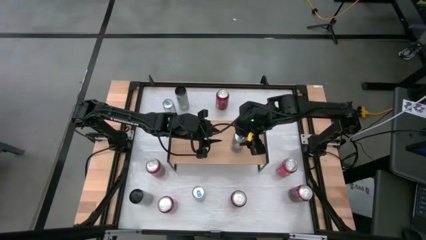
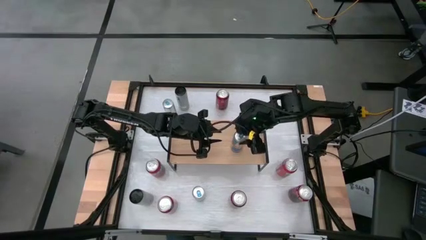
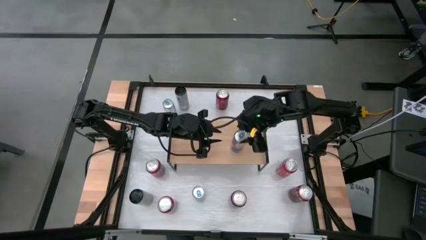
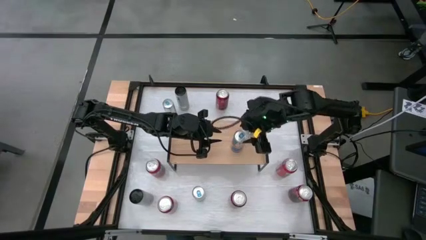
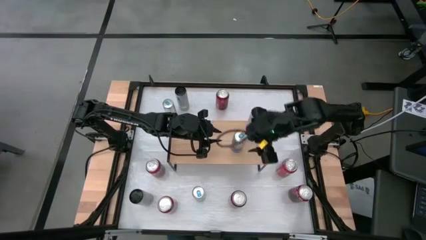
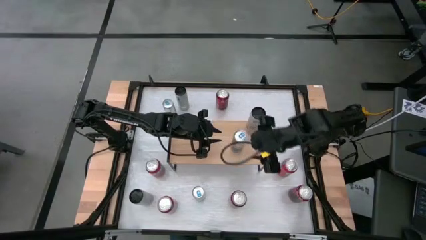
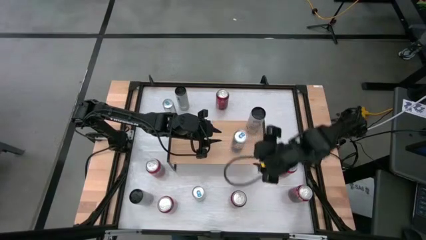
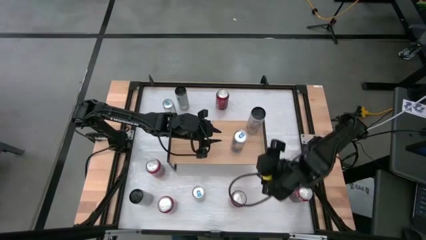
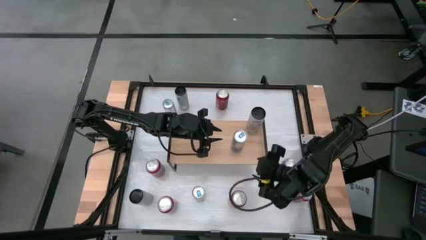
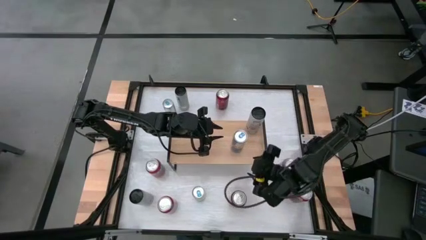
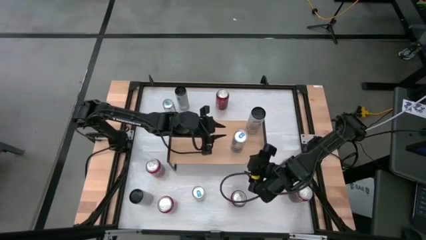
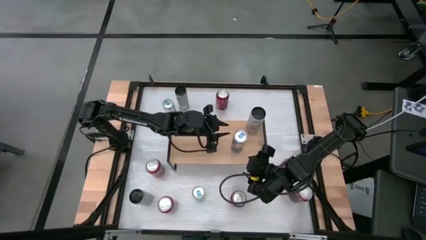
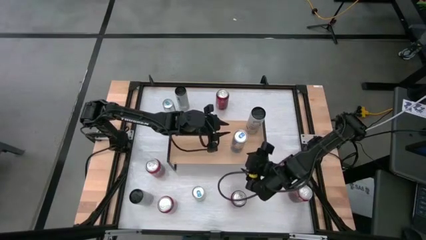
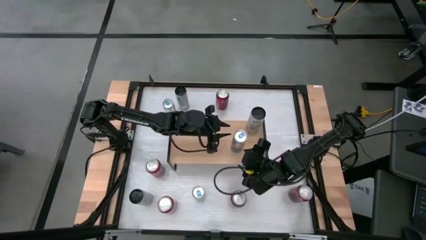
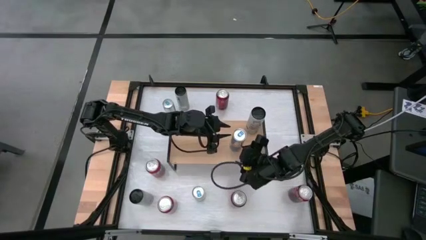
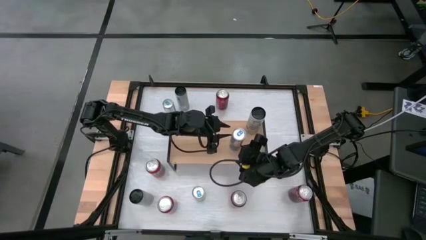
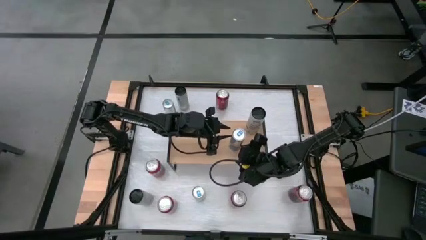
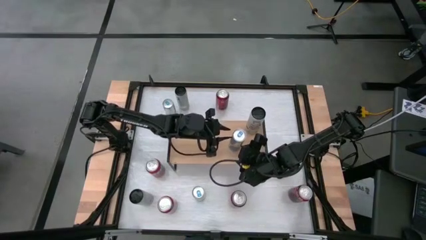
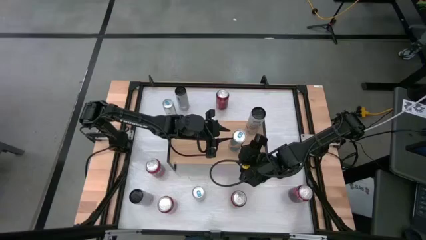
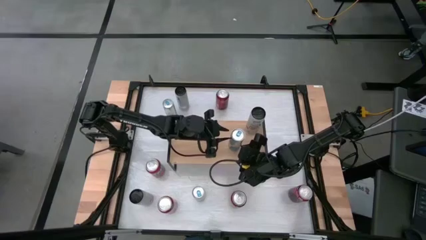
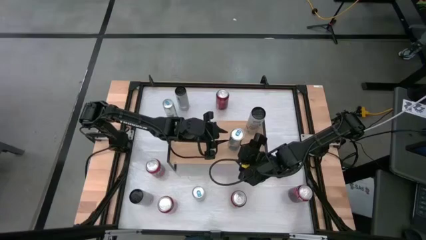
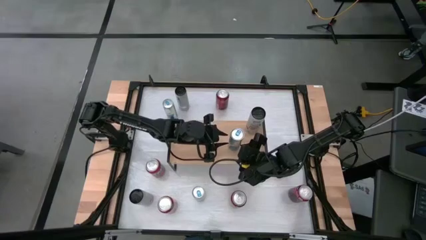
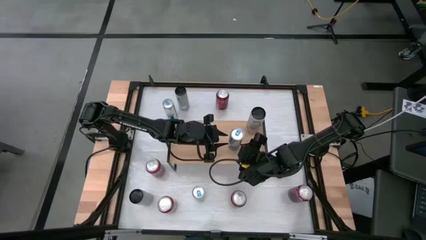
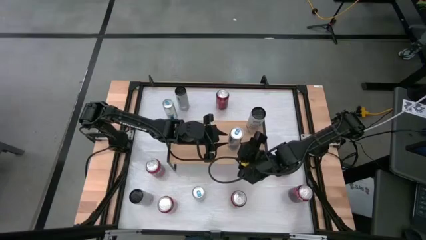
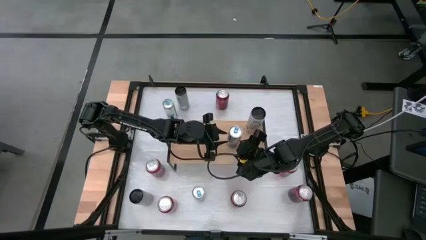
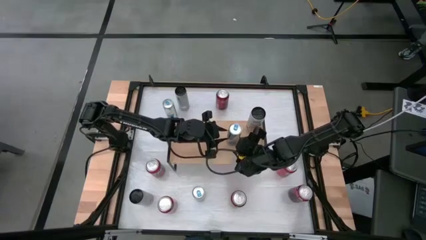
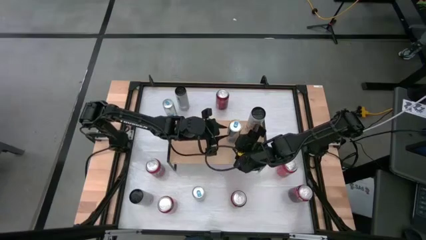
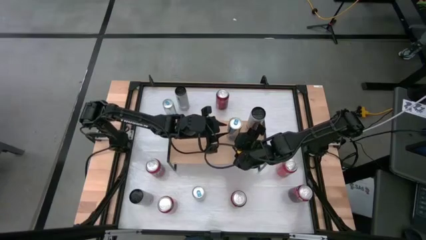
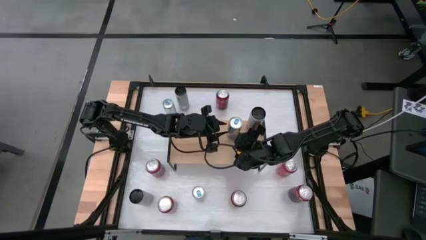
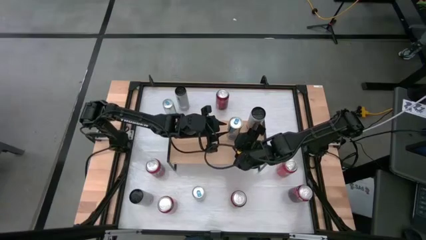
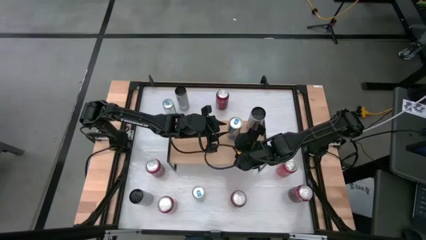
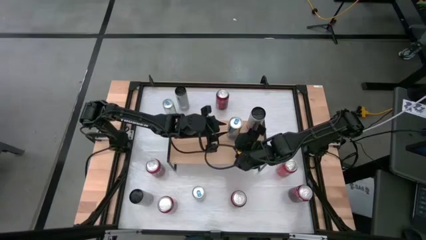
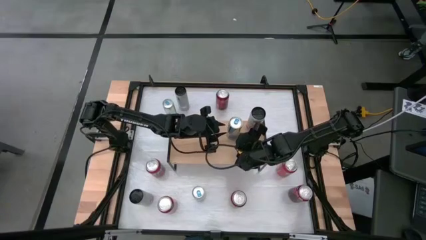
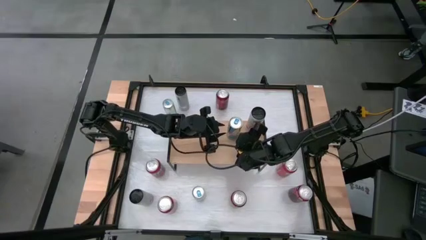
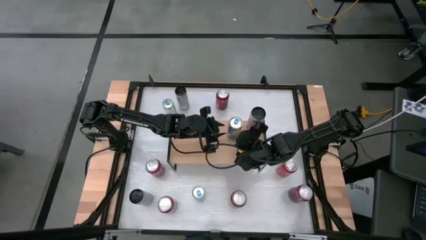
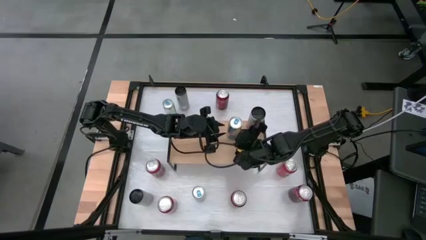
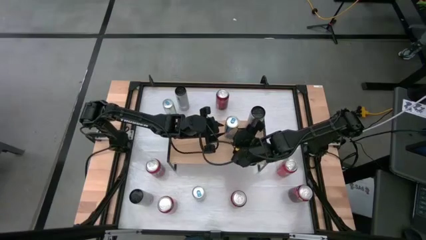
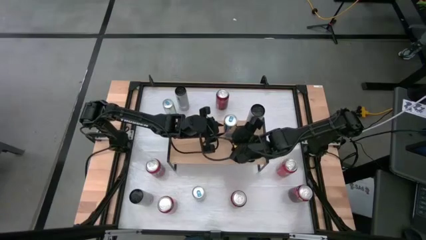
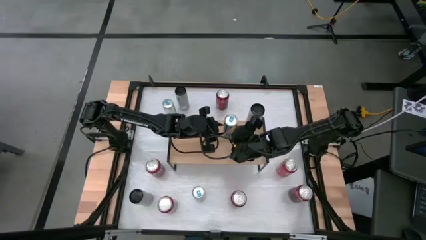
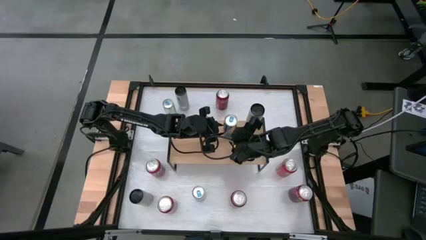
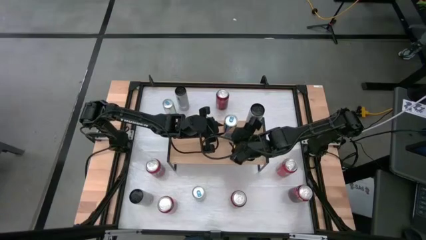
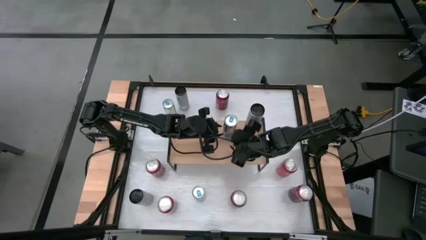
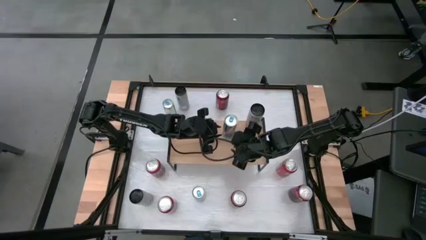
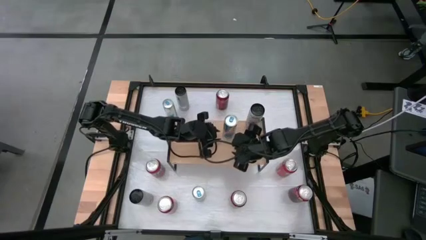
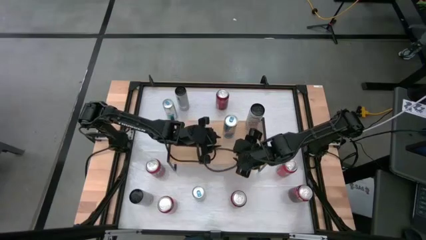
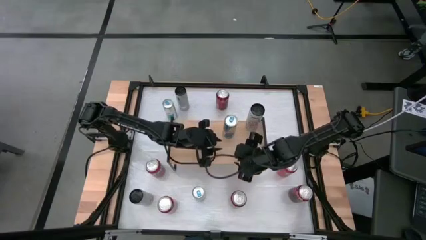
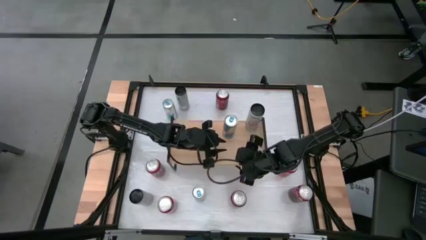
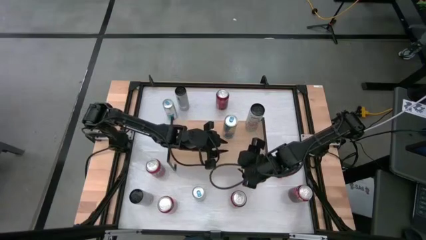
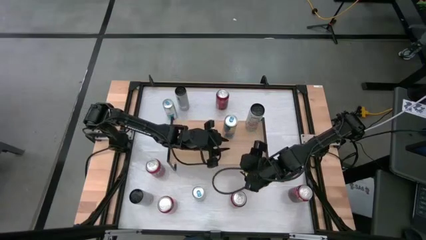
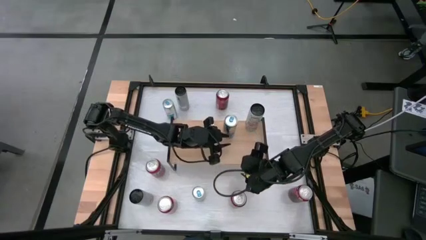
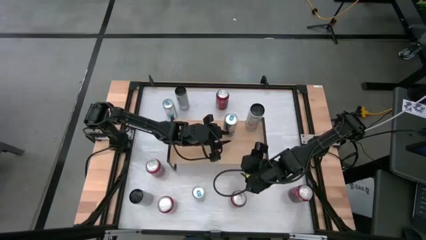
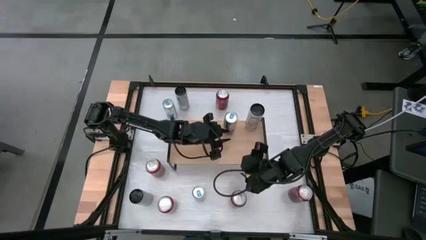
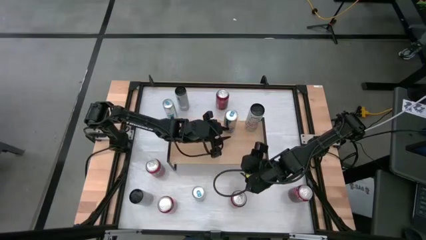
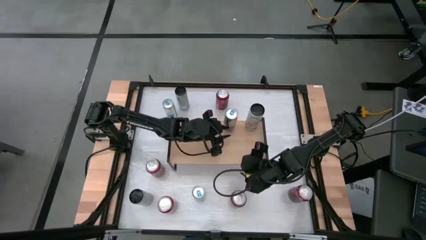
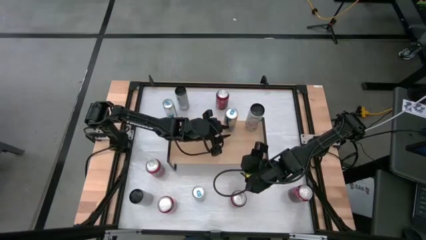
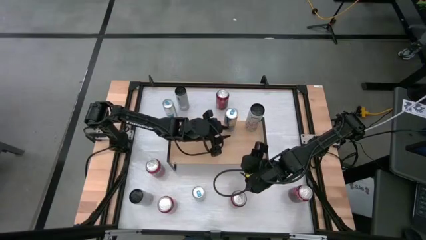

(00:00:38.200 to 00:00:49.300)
Task: Place canned beverage on shelf
Put the top right blue soda can on the shelf
